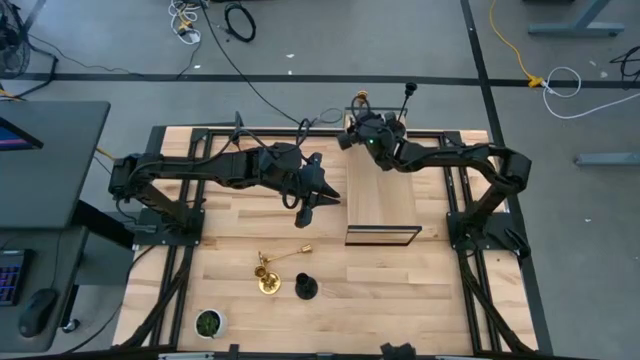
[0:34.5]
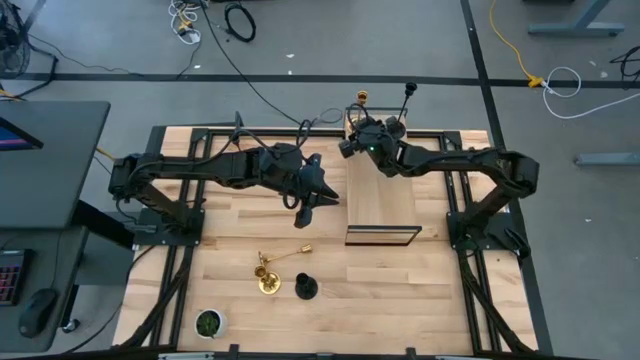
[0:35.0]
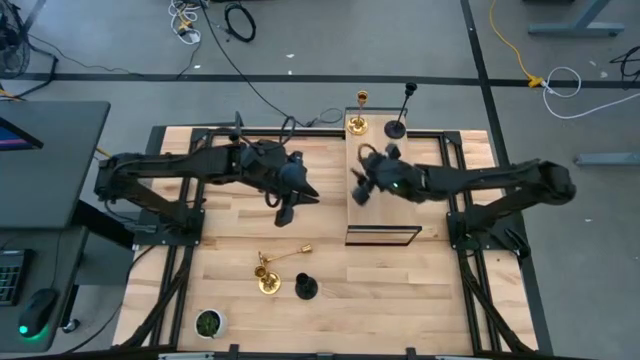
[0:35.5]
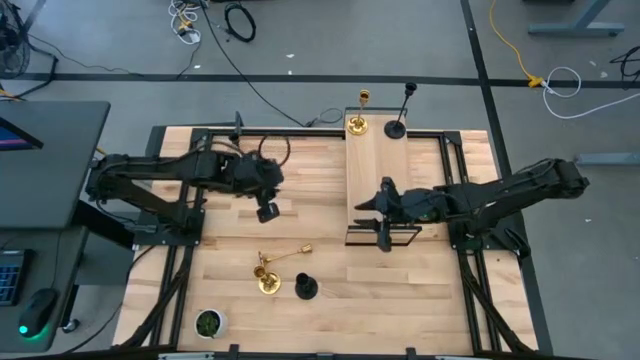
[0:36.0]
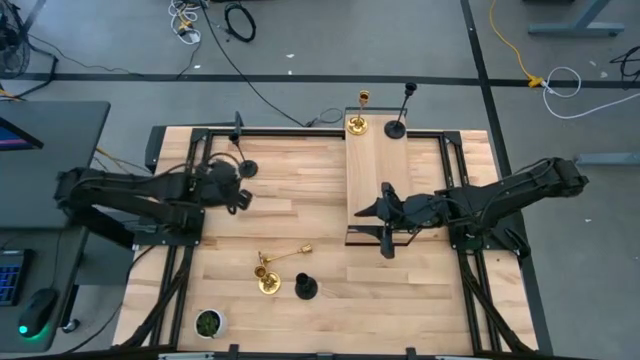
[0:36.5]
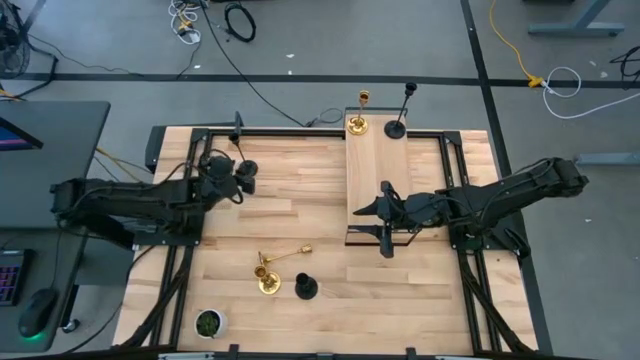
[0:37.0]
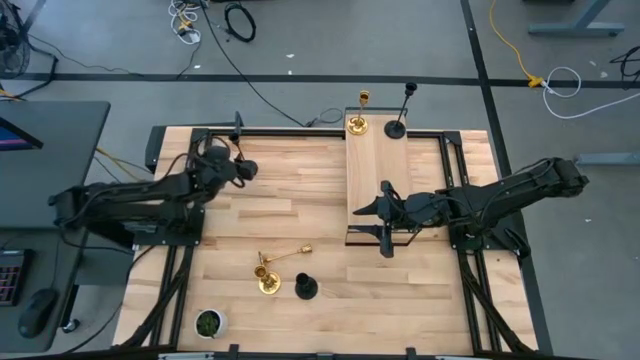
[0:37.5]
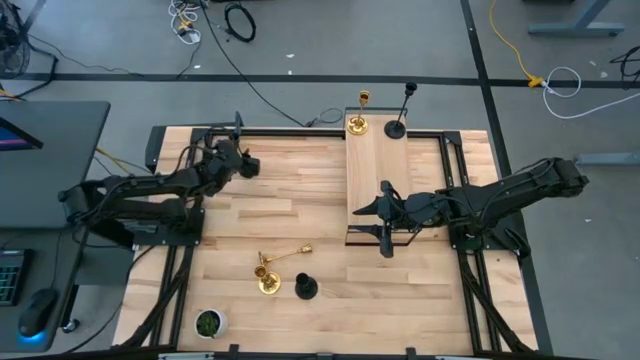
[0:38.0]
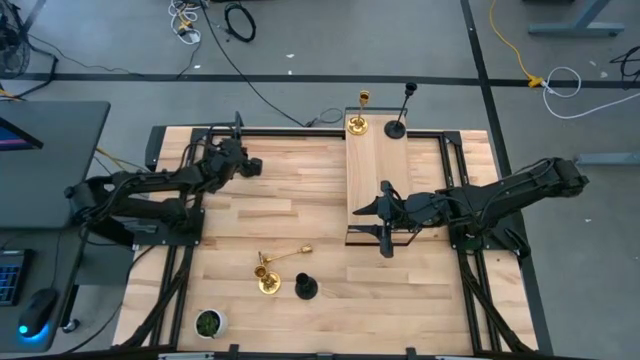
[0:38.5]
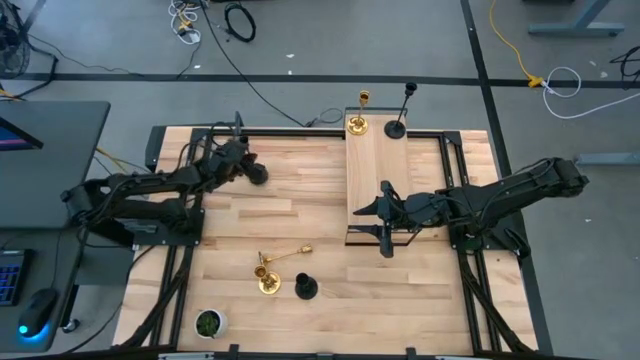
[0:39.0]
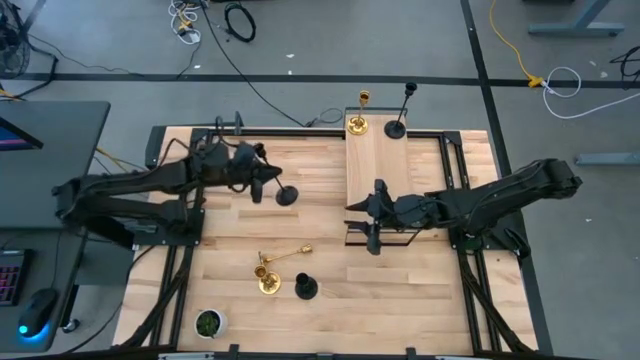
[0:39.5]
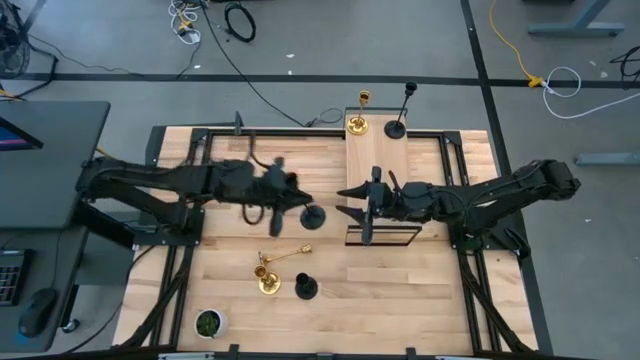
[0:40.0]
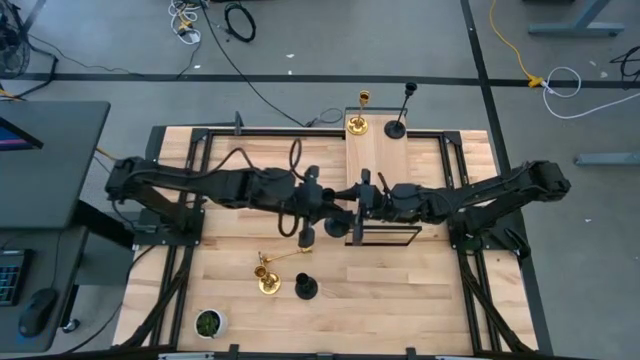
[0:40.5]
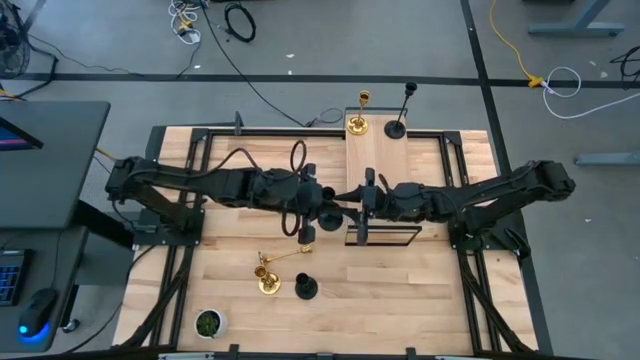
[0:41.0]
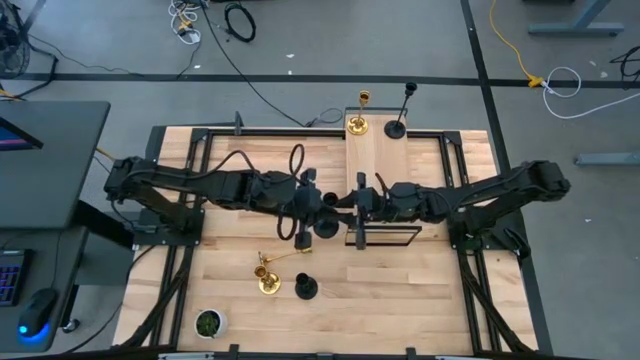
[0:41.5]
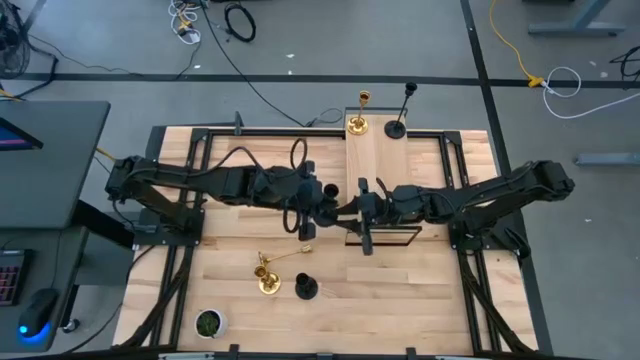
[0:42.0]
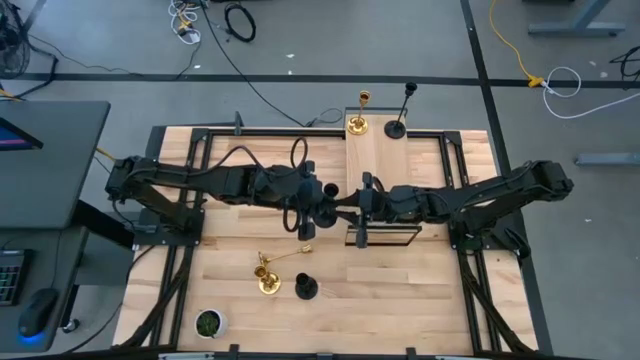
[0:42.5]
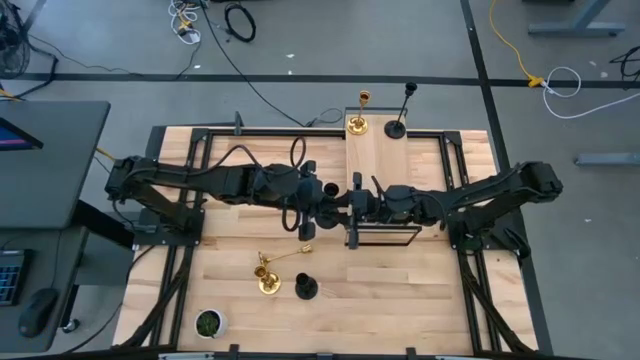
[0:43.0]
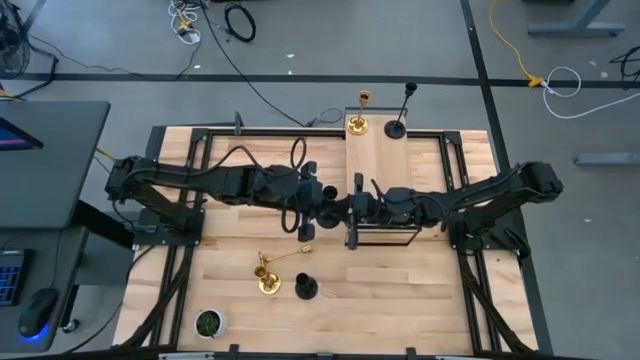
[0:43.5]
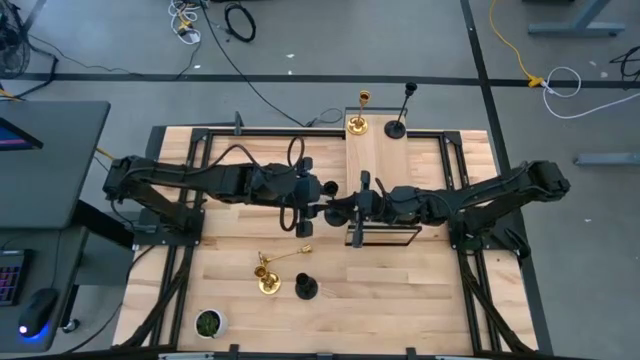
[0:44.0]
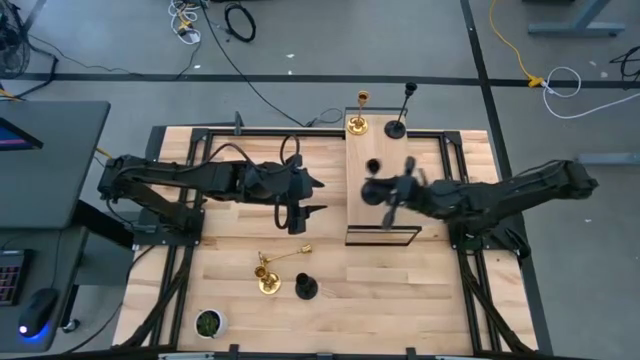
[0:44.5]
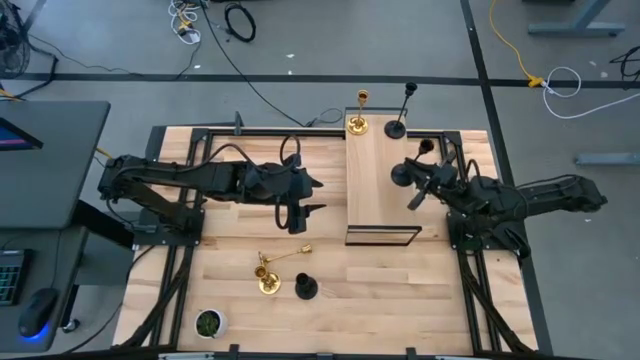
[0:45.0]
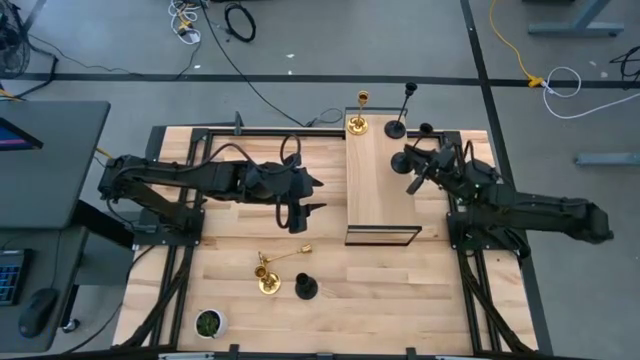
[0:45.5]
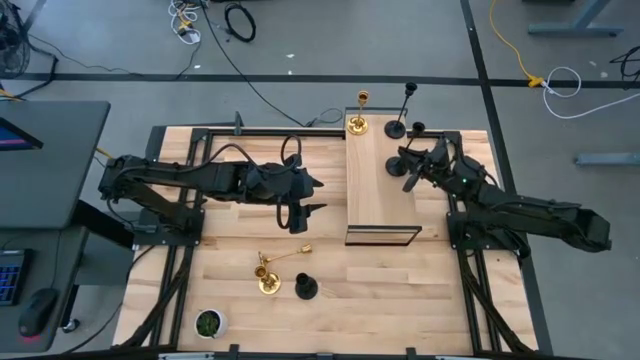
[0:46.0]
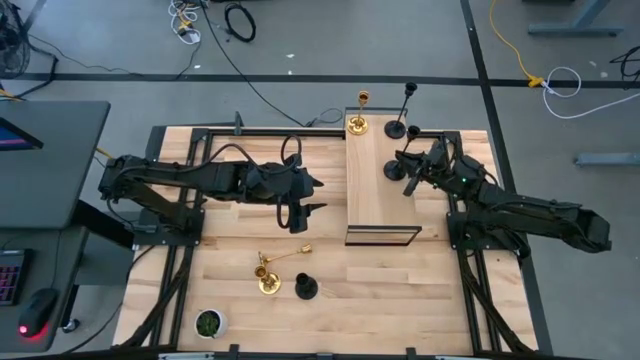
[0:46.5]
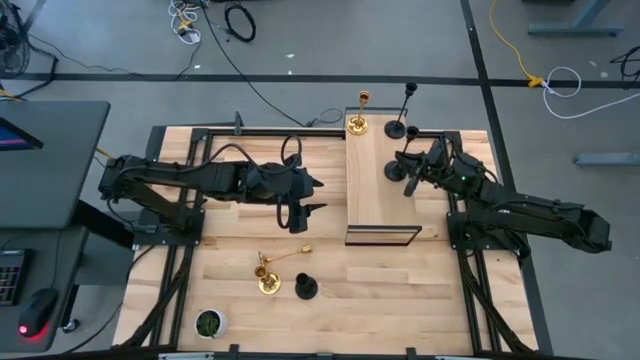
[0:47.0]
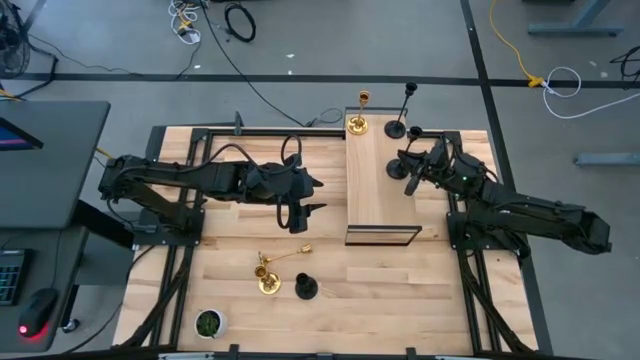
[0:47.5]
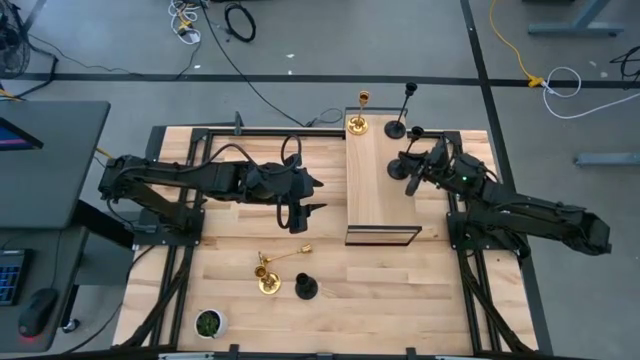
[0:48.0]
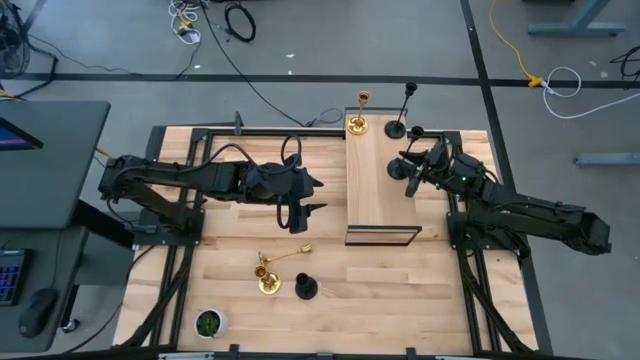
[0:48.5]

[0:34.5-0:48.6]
Task: Pick & Place candle stick holders
Put the top black candleholder on the shelf aligned with the other black candleholder

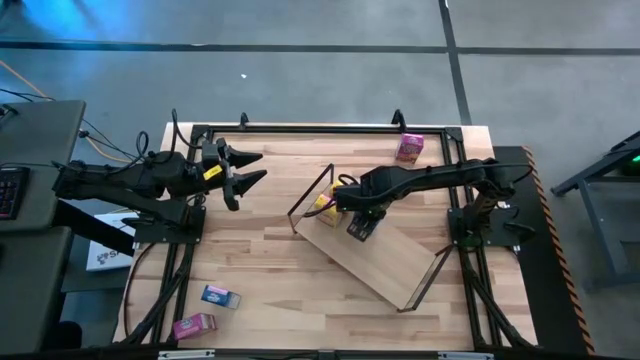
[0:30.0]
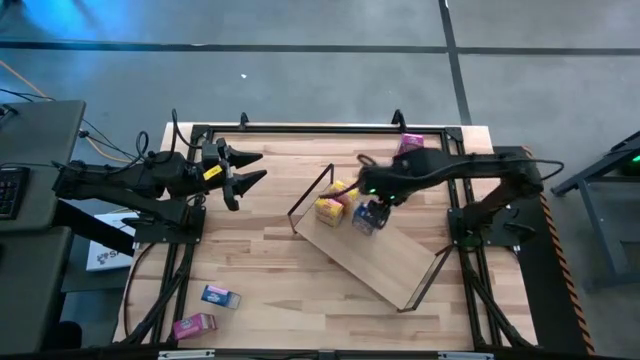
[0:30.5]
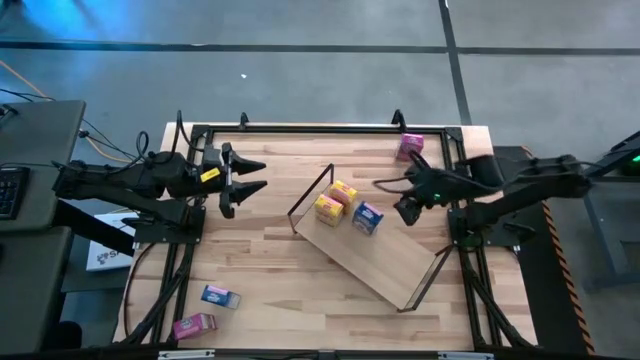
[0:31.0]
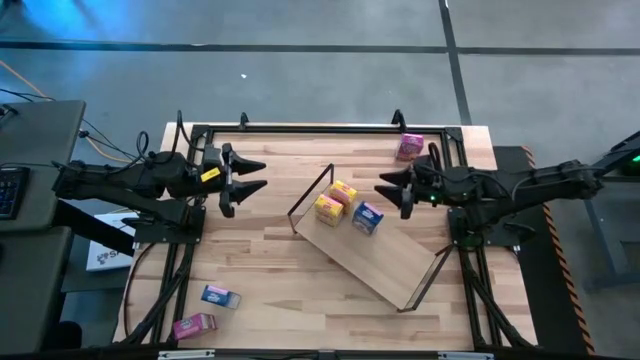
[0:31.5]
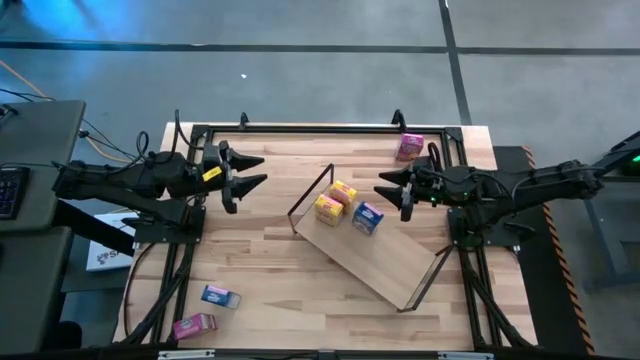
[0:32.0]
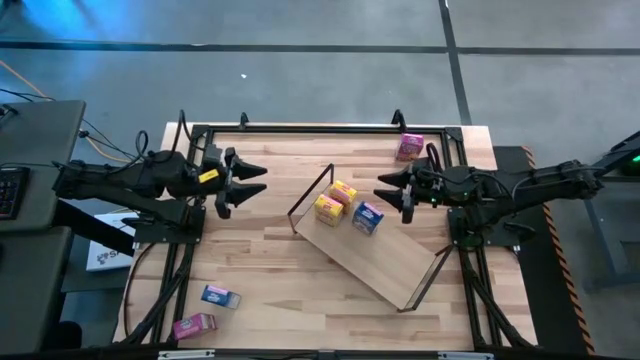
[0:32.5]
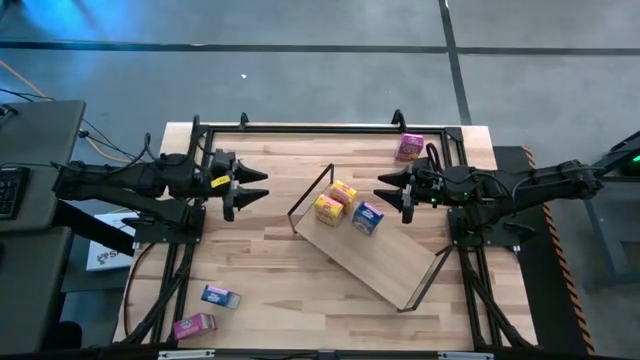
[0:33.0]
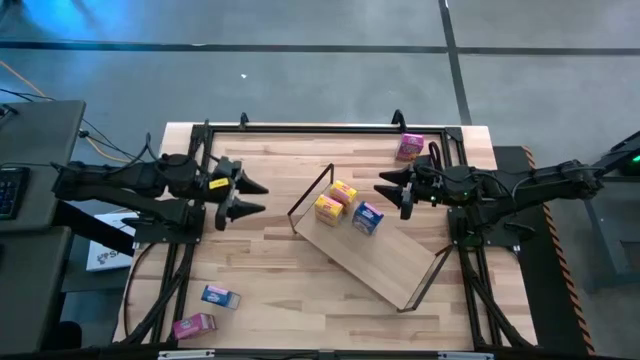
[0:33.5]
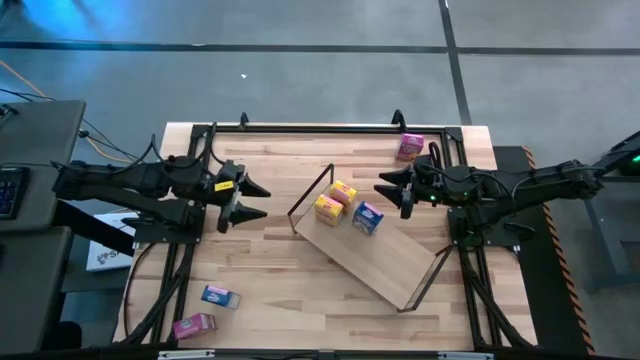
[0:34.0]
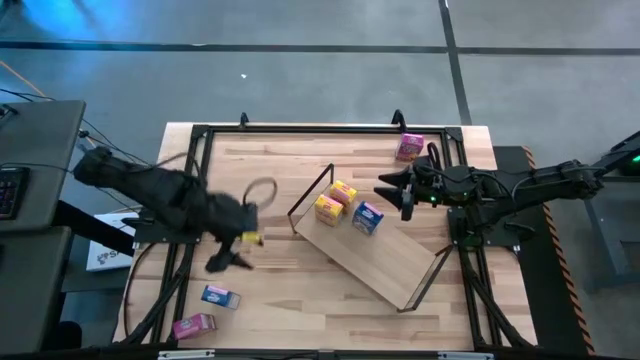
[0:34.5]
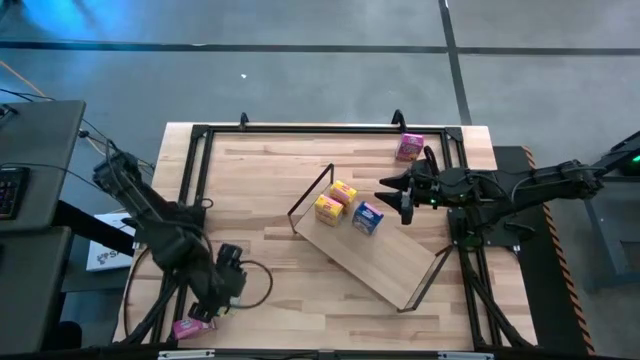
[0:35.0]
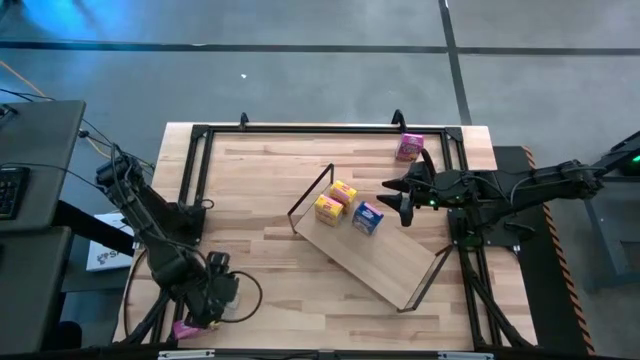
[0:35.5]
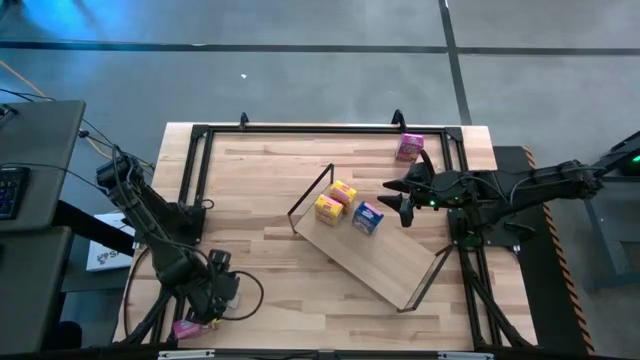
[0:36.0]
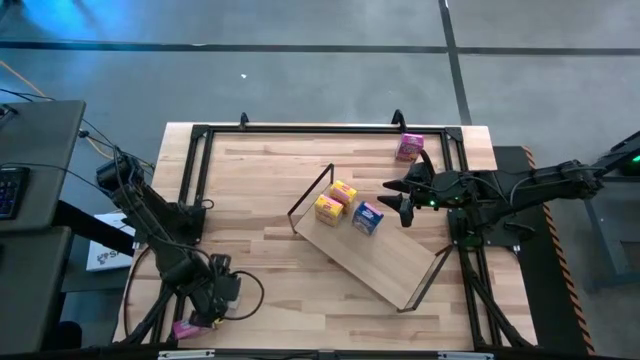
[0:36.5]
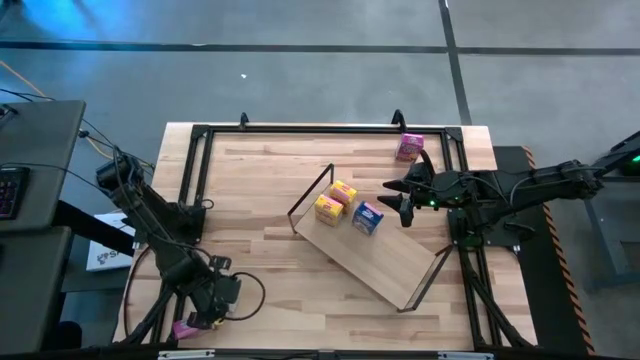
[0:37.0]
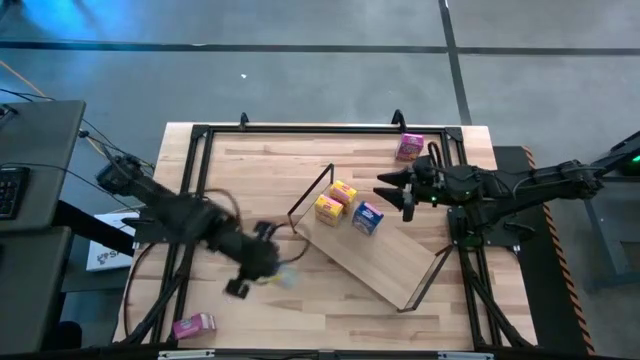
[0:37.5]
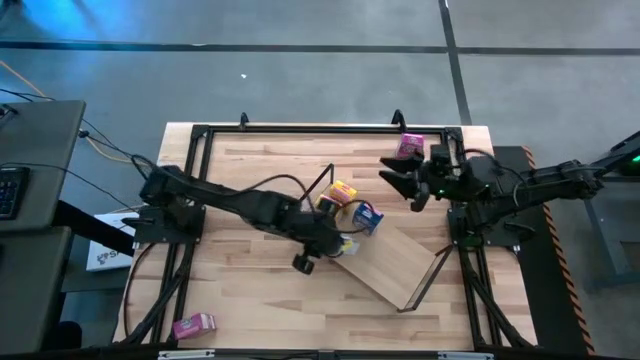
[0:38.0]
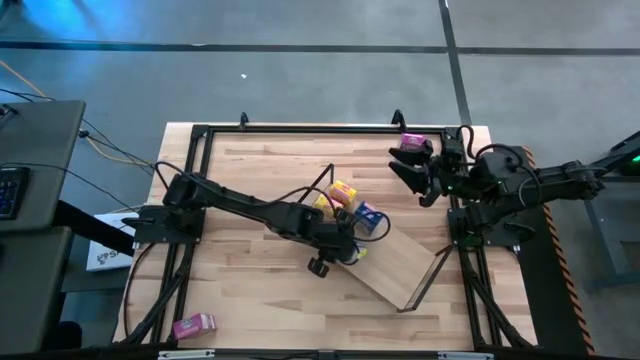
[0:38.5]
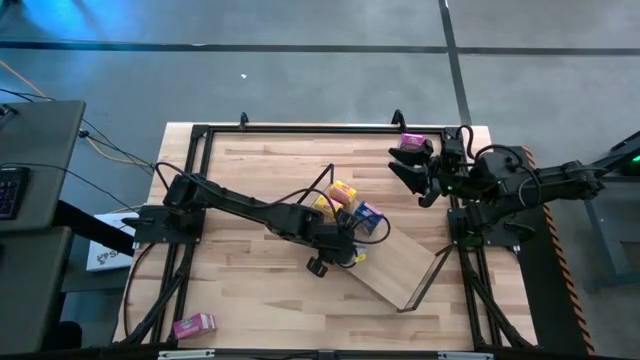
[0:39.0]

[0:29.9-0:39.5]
Task: Stack cereal on shelf
Put the bottom blue cereal box on the shelf
